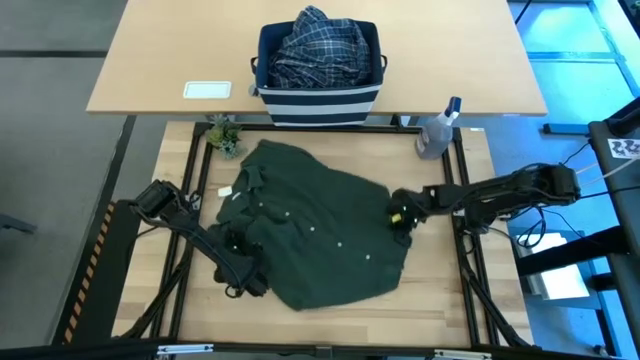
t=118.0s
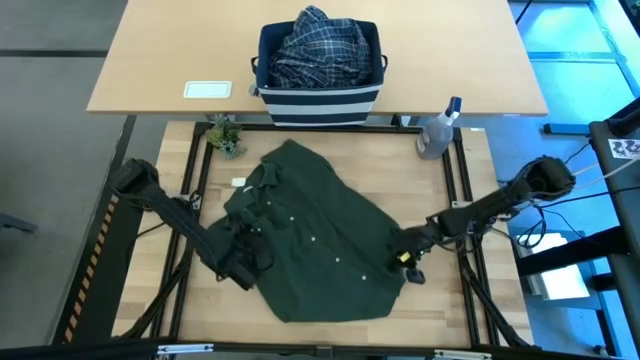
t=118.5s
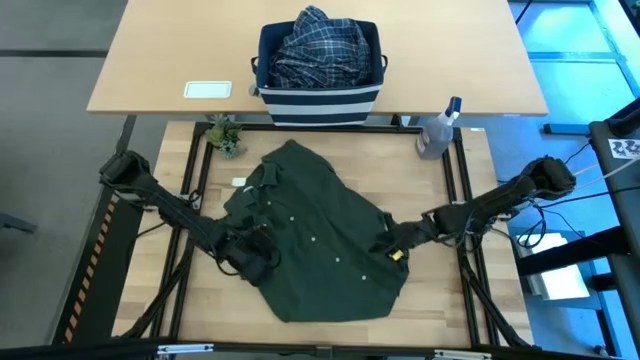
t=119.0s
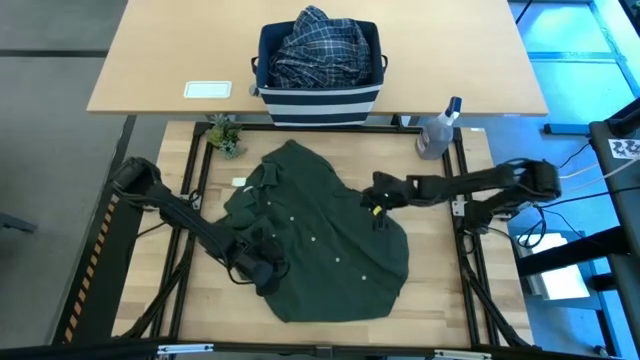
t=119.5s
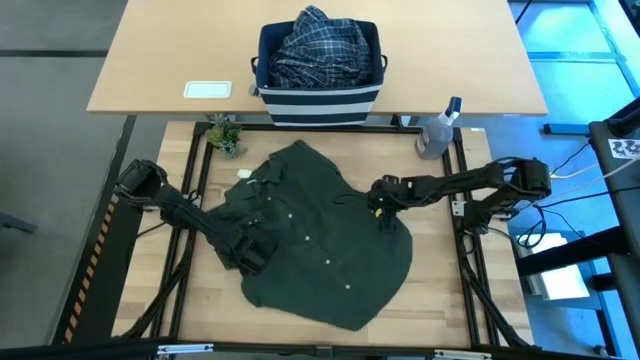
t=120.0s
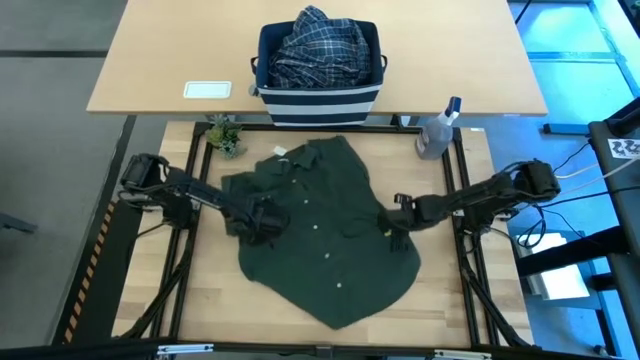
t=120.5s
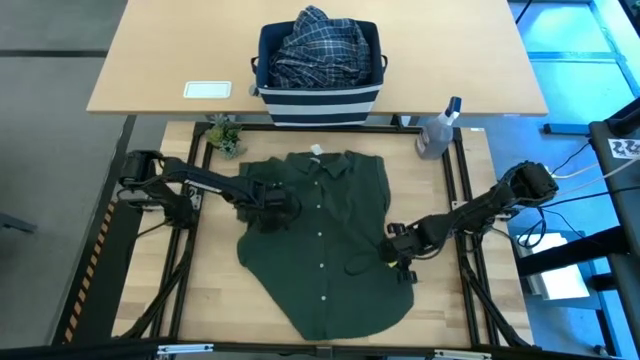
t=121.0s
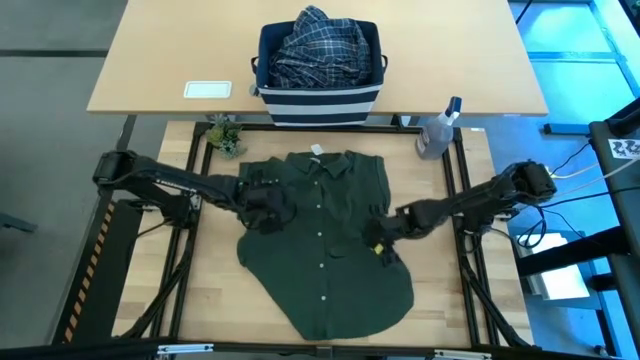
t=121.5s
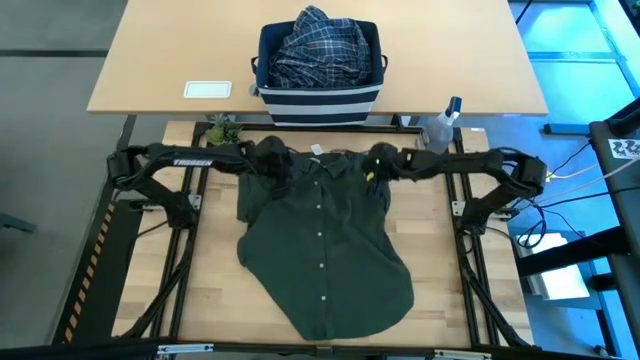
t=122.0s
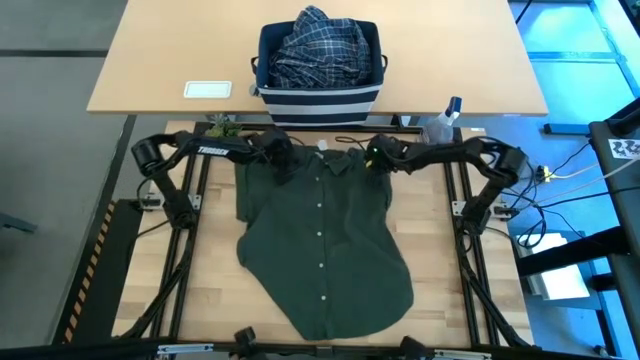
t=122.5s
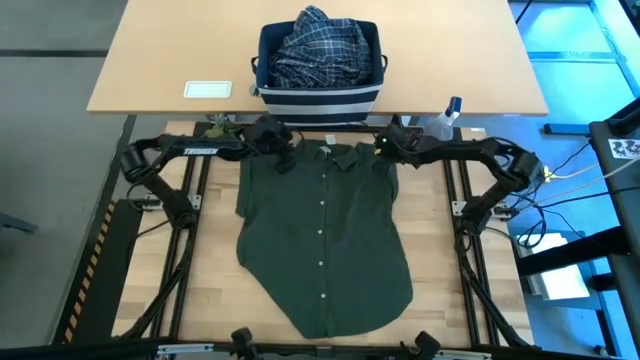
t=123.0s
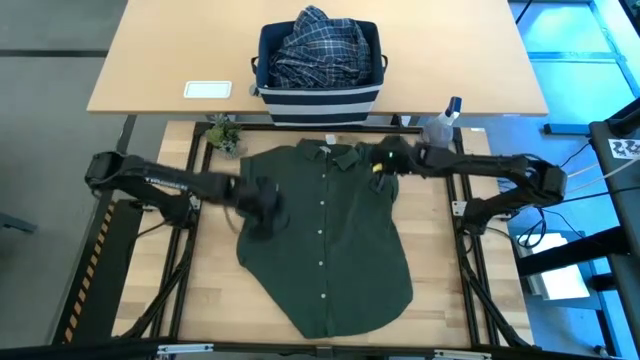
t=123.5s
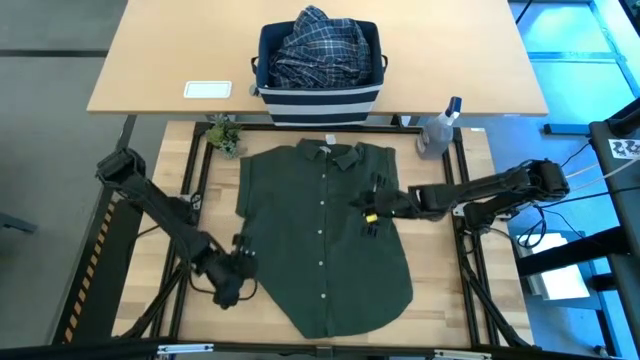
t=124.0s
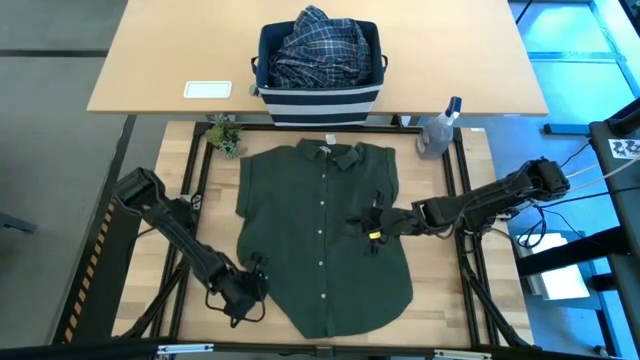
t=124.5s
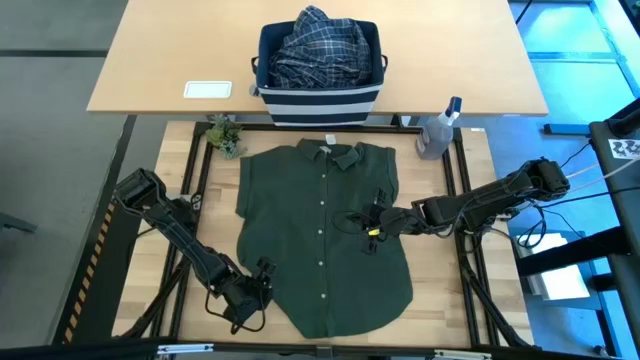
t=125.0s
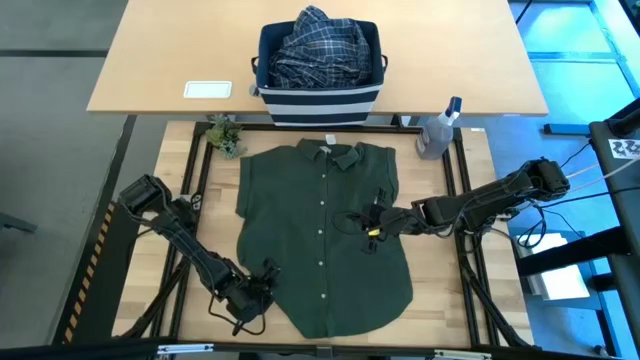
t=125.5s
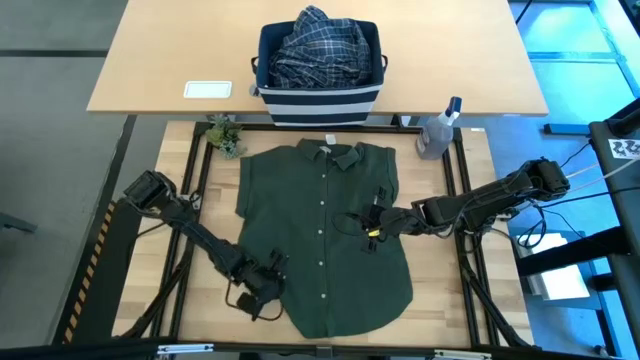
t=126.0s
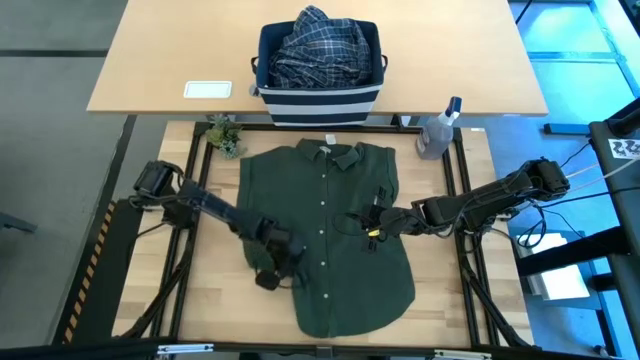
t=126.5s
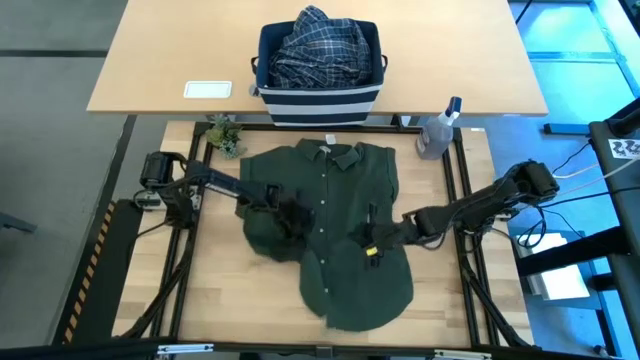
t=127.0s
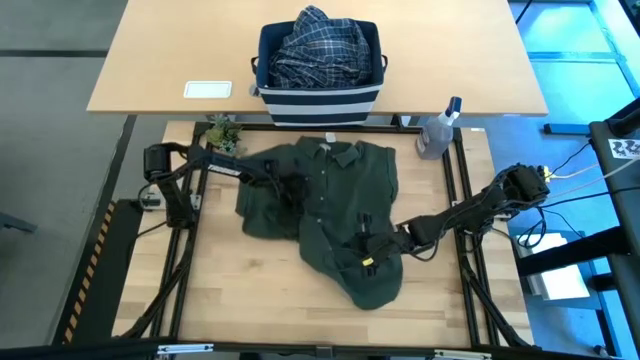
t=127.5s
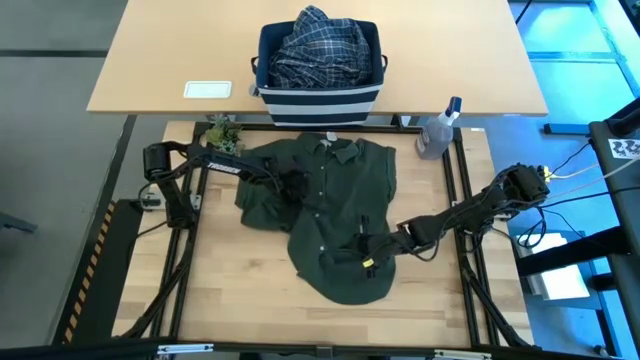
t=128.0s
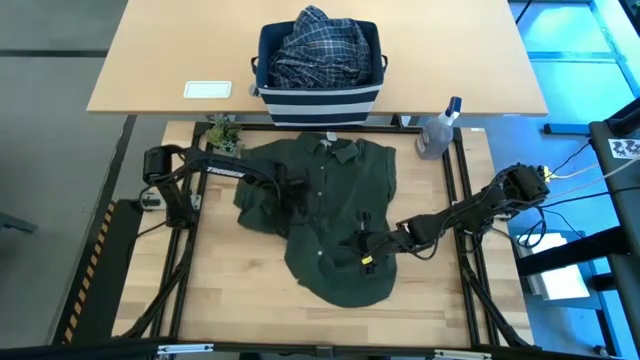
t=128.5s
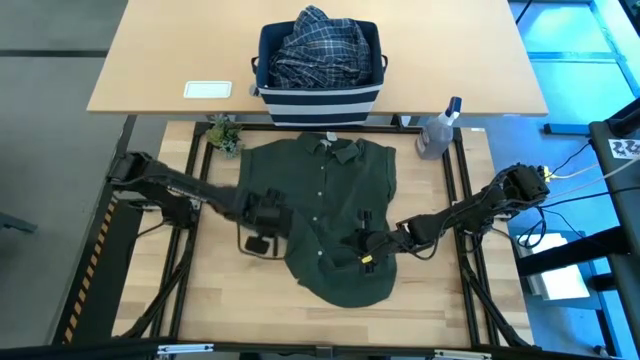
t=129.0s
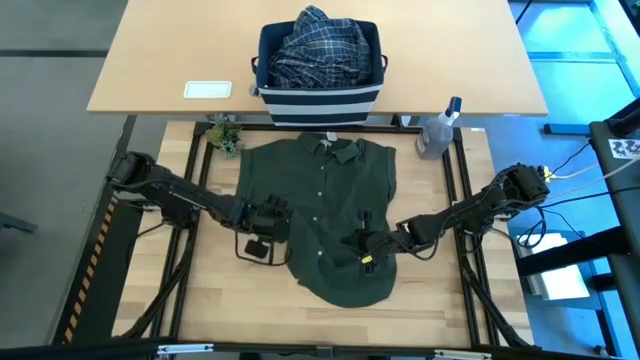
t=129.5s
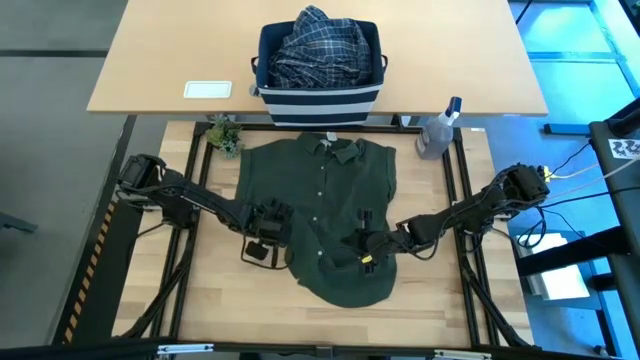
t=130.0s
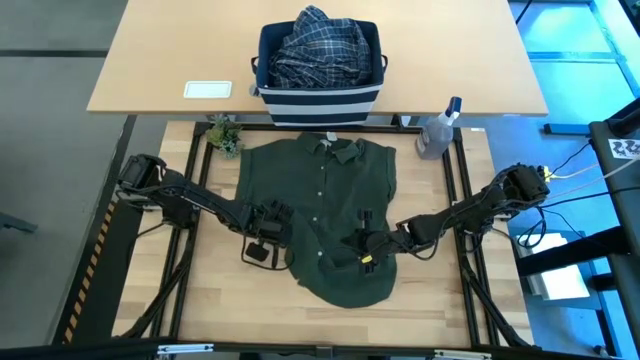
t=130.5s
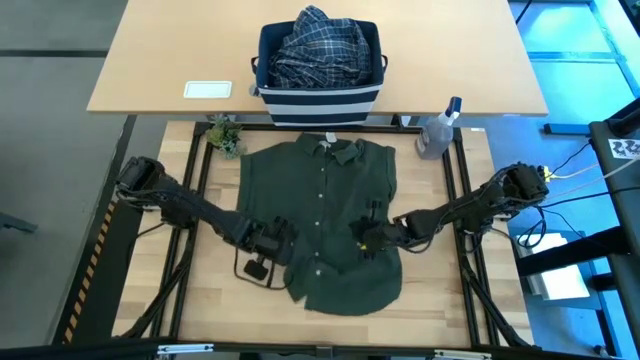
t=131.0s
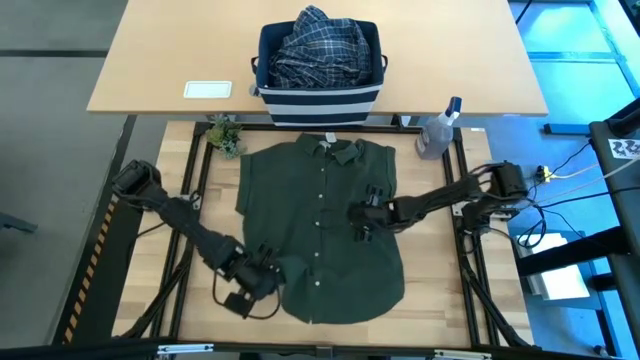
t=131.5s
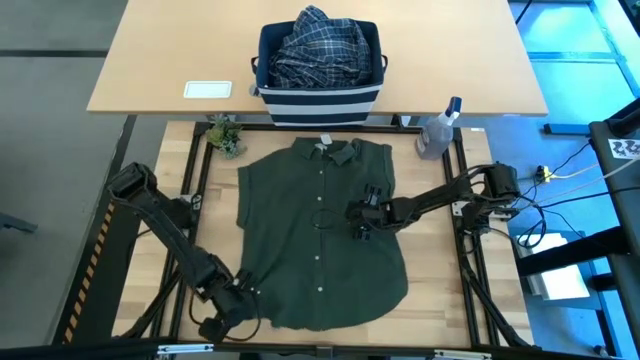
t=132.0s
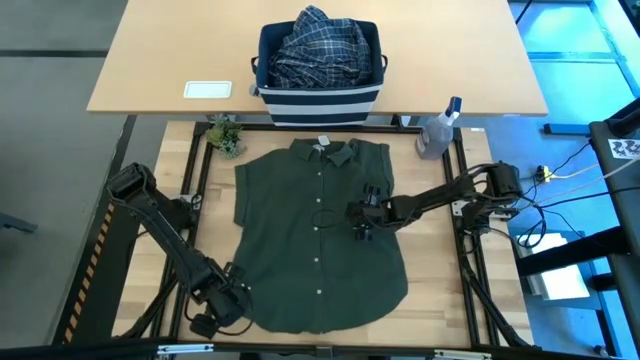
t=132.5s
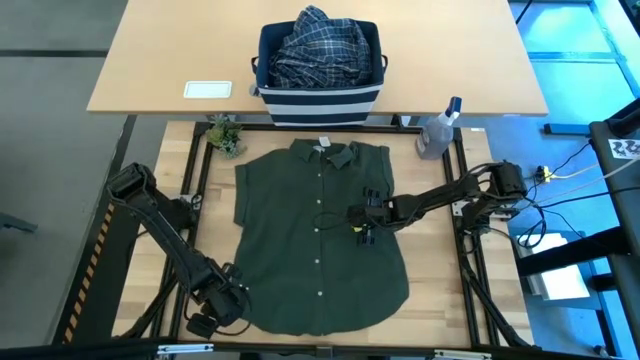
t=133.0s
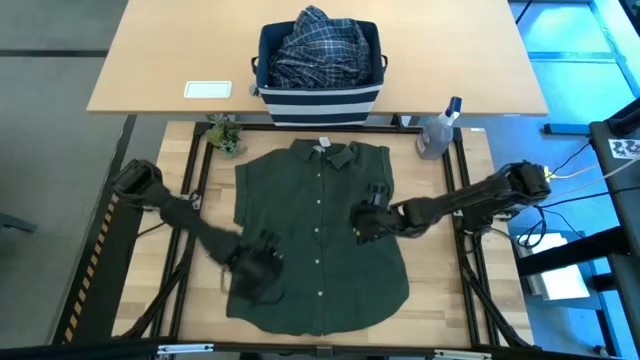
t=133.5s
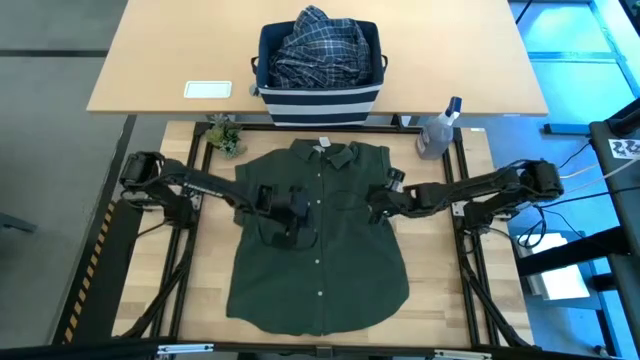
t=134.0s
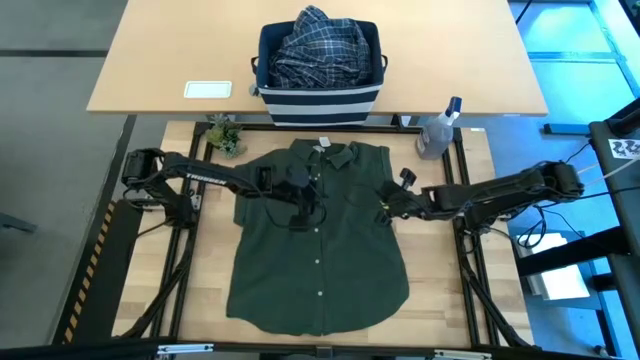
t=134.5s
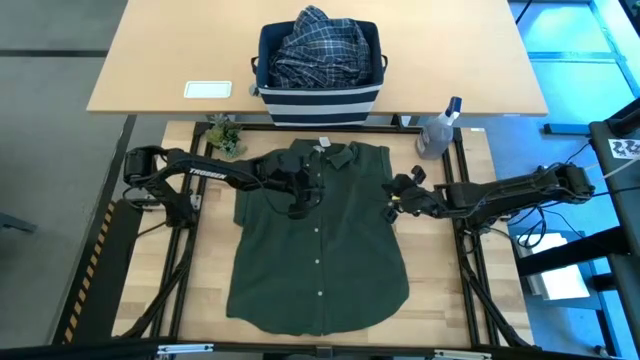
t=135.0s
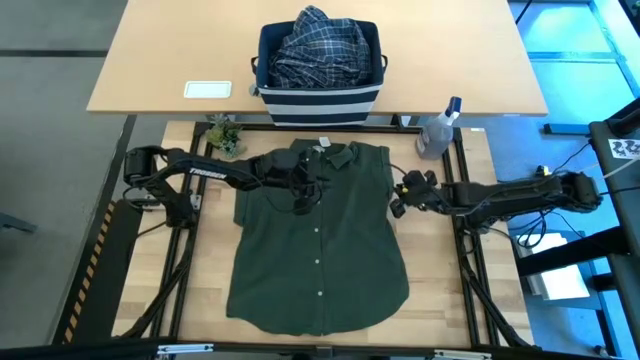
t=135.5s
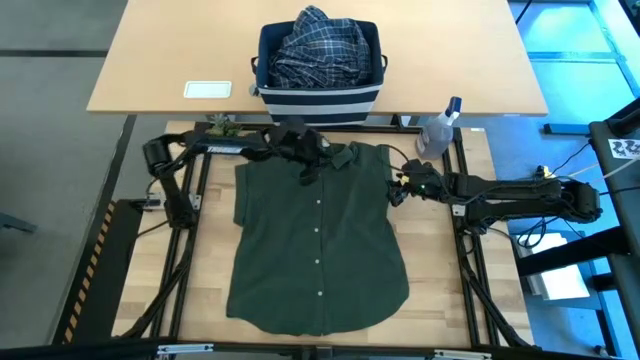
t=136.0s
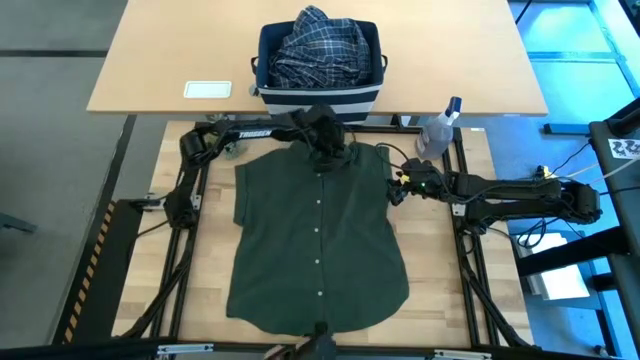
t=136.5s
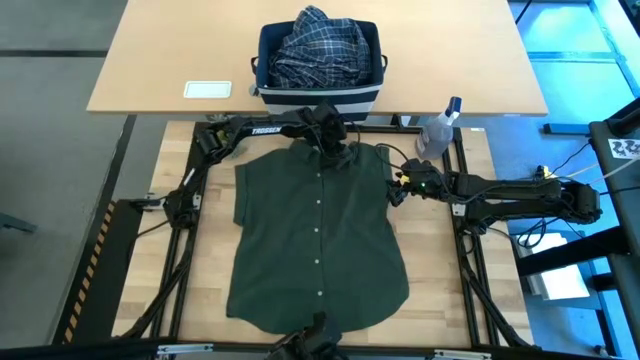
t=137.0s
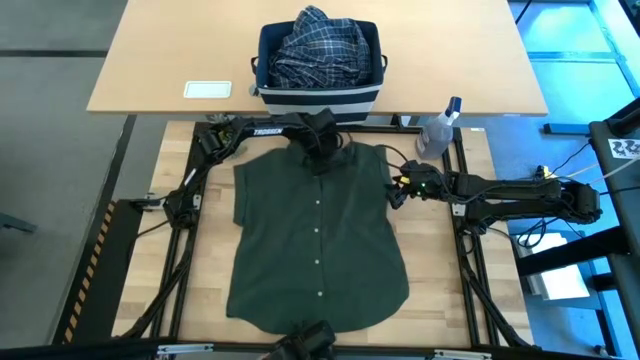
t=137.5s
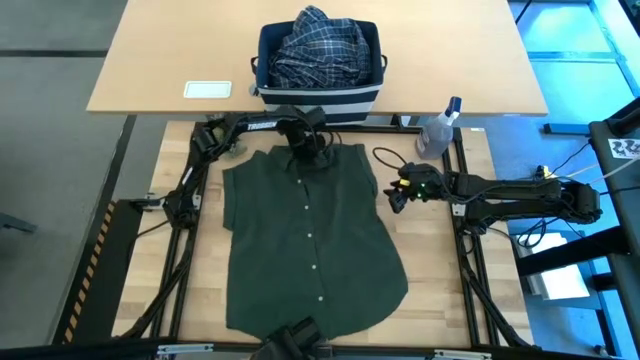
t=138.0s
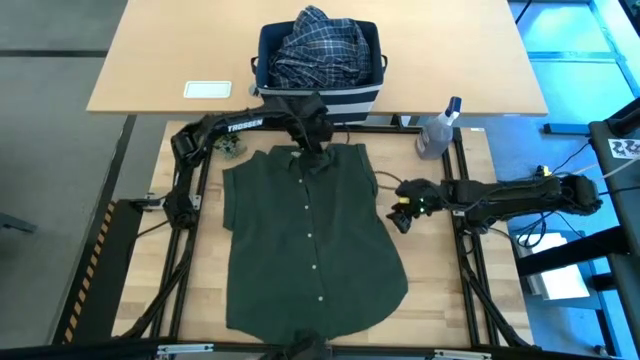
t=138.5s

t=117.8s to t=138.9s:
Task: Fold Laundry from Bin
Fold the green polo shirt
